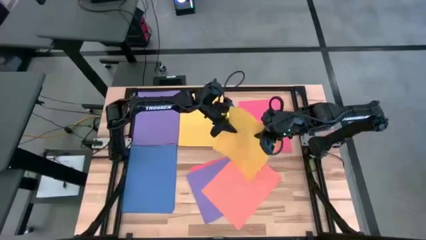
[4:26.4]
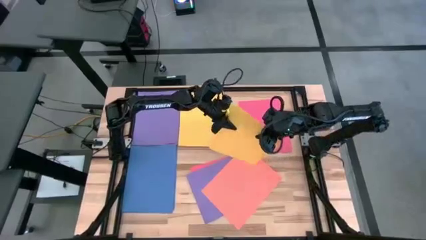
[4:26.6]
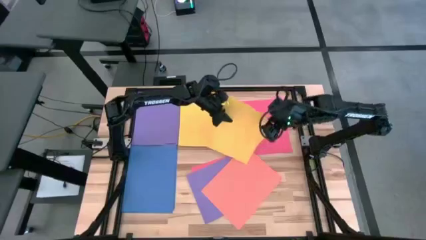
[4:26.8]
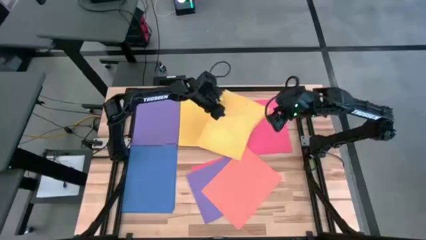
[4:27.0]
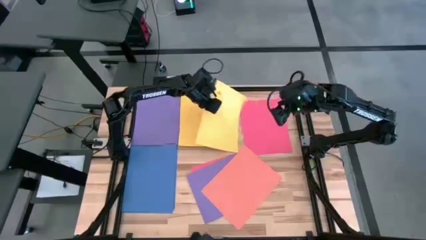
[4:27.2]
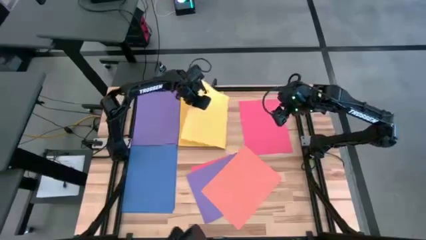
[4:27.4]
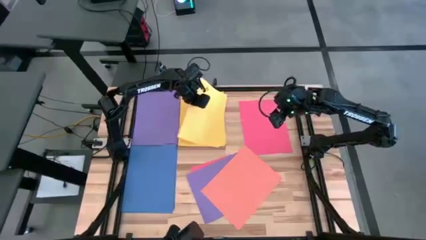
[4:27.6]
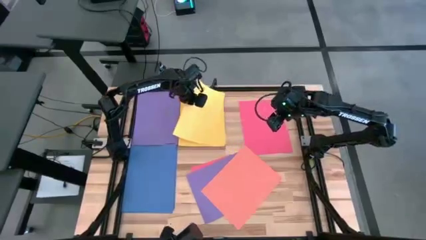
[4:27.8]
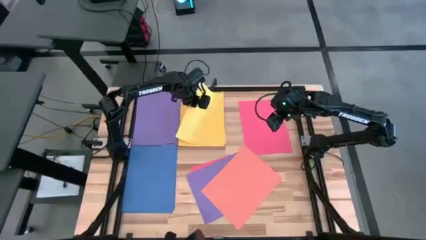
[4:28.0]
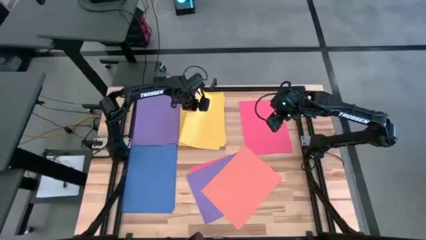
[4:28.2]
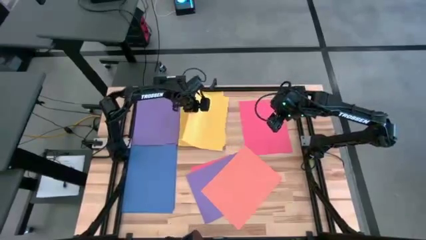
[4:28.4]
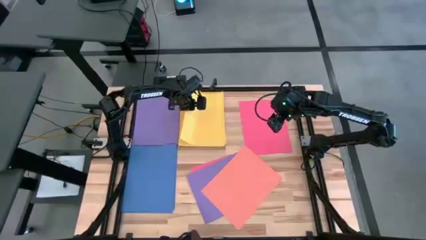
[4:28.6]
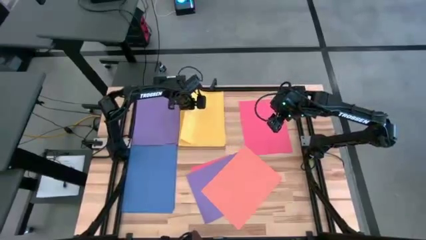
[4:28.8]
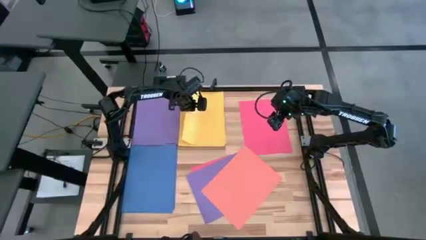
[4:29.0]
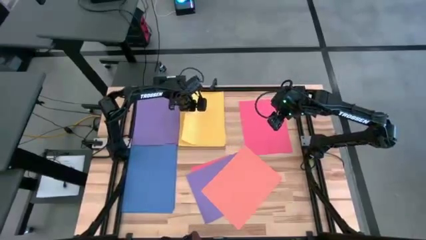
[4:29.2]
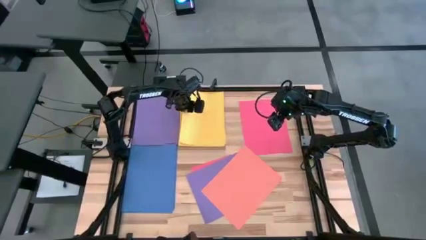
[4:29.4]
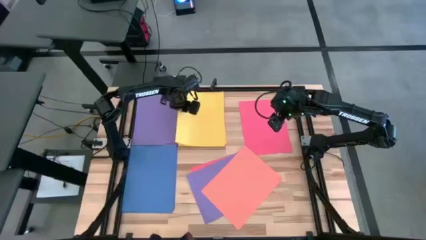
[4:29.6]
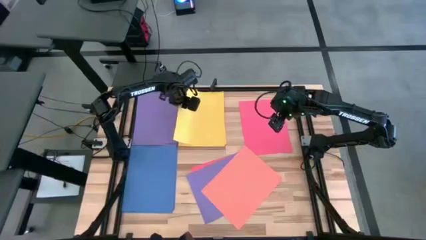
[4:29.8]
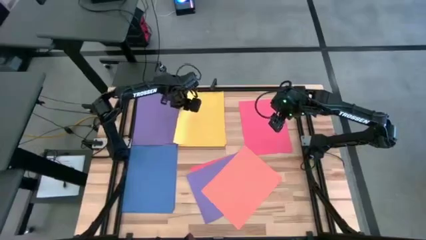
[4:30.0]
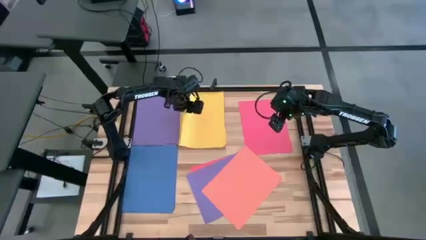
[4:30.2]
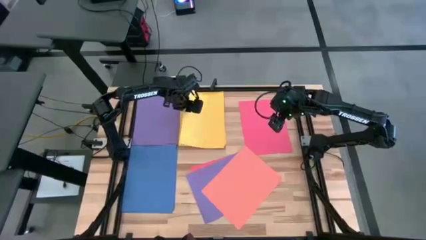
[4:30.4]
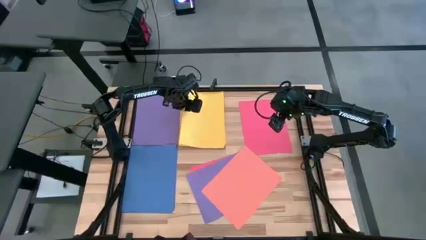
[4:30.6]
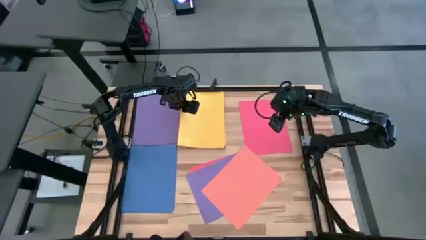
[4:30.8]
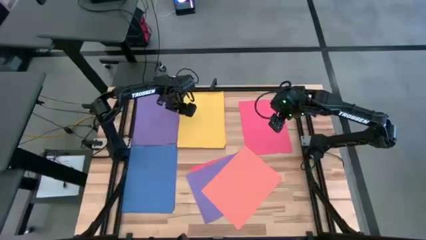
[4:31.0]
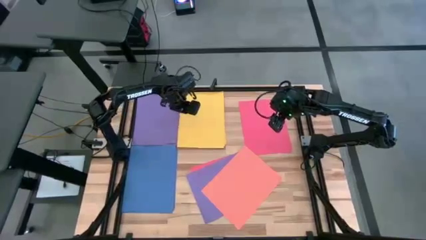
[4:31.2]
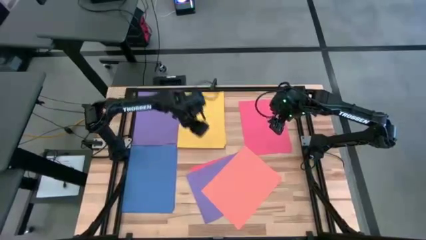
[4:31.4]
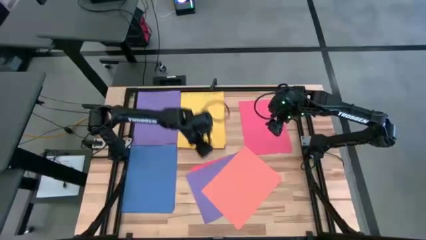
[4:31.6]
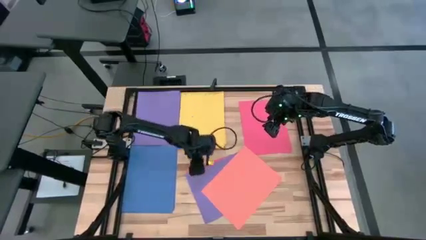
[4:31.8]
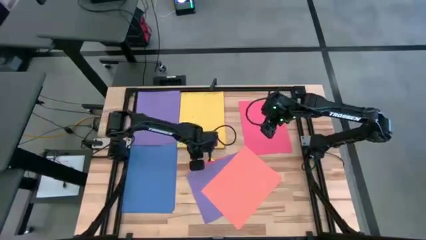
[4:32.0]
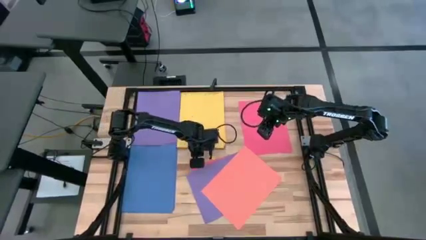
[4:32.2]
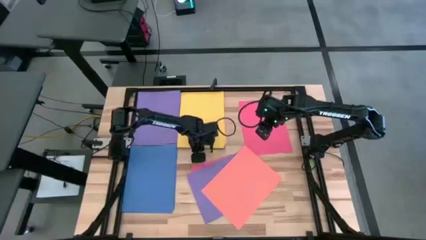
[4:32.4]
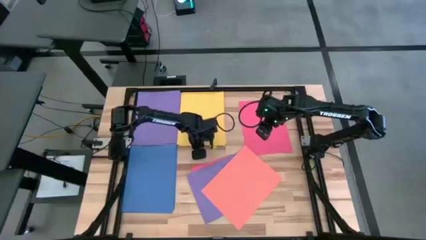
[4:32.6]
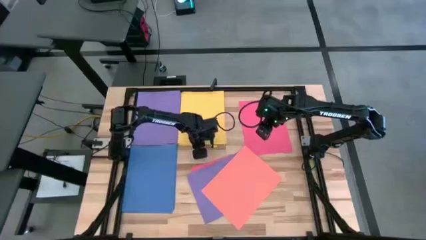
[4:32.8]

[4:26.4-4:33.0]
Task: Organize paper
Stack the yellow paper on top of the yellow paper

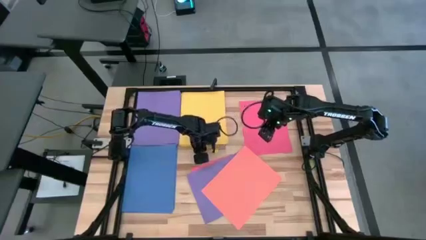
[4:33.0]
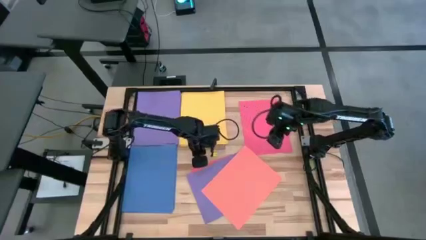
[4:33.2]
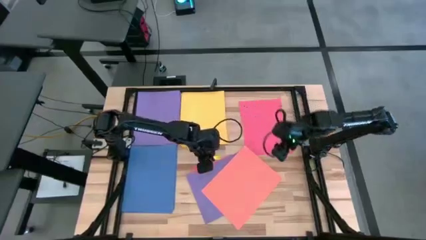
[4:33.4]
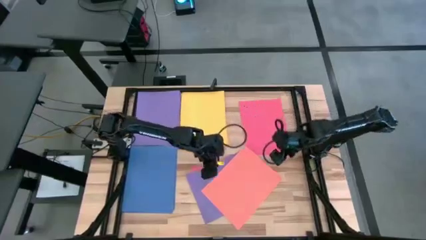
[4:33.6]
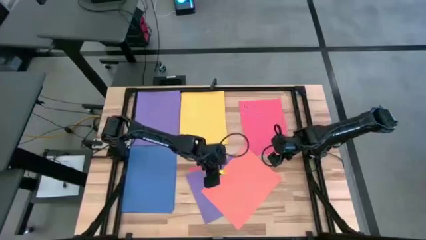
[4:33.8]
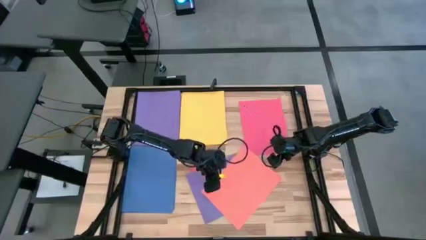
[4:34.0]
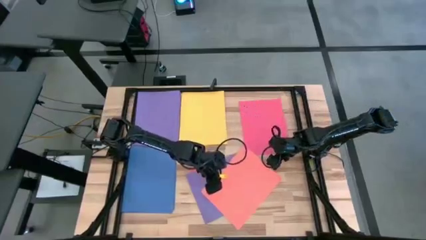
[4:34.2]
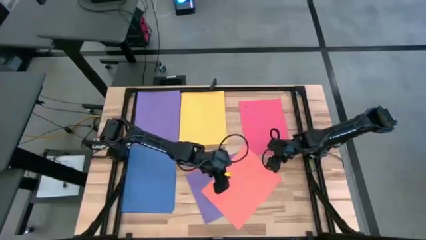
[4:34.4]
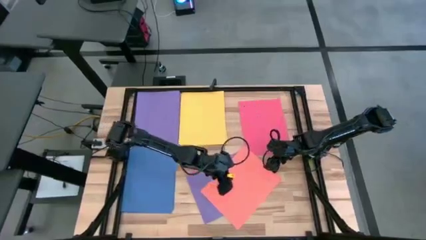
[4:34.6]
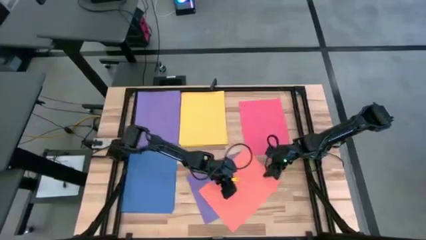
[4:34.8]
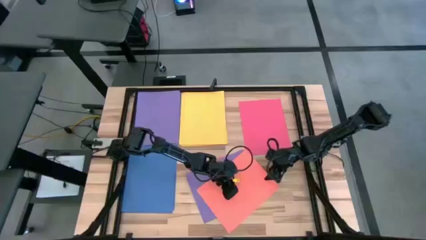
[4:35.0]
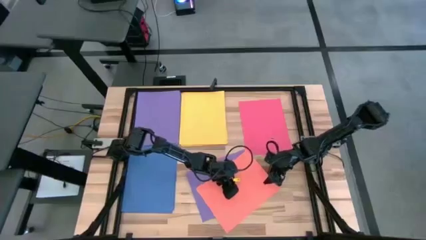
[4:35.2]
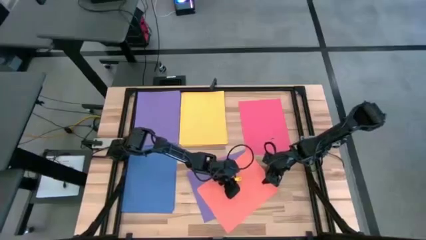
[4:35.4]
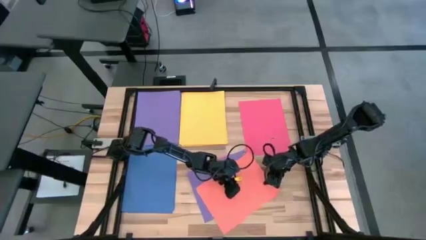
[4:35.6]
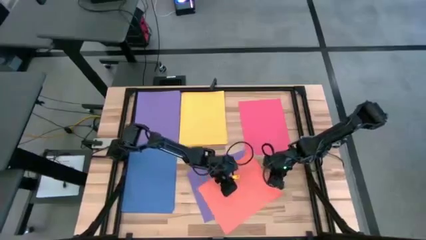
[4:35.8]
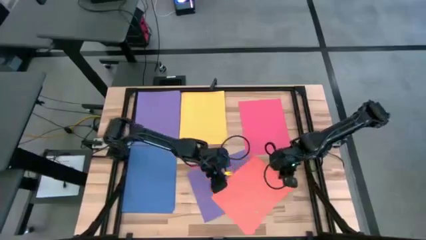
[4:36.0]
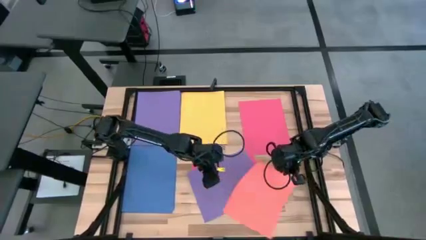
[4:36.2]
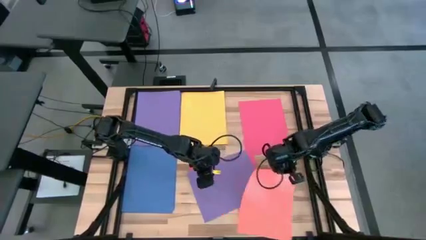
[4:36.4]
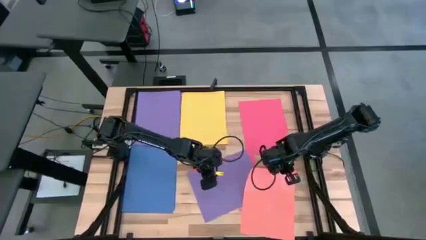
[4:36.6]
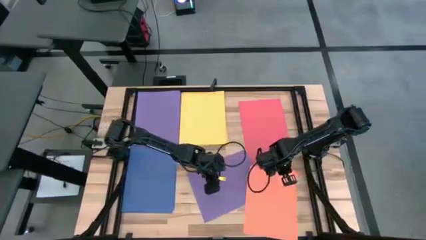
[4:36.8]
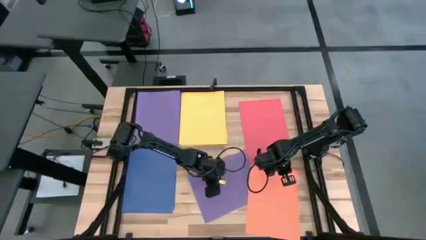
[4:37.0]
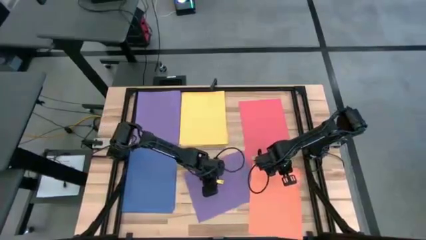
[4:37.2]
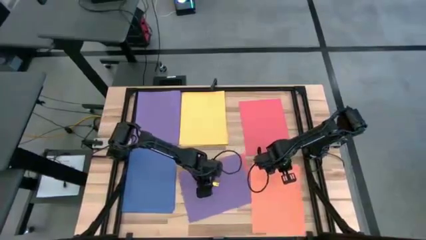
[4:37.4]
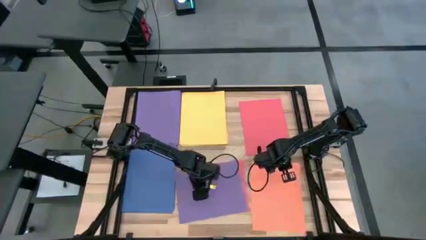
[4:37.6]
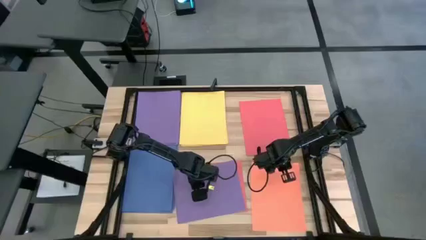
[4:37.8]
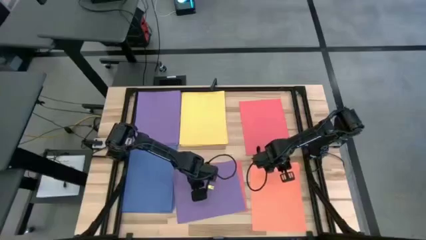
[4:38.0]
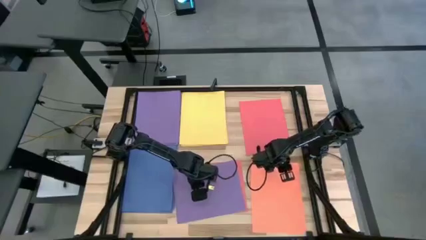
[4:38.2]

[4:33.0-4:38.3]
Move the orange paper to the bottom right of the table

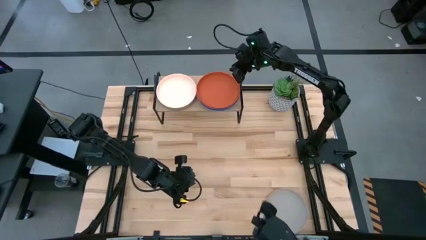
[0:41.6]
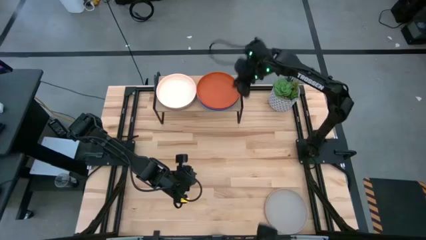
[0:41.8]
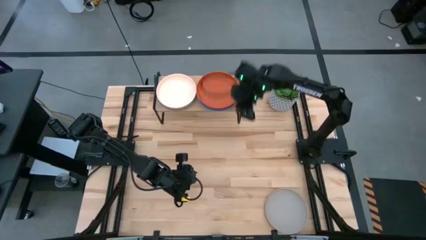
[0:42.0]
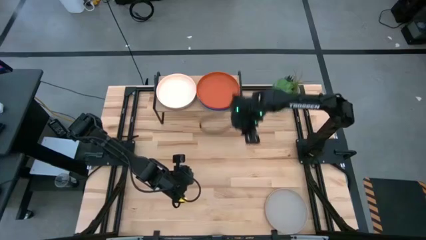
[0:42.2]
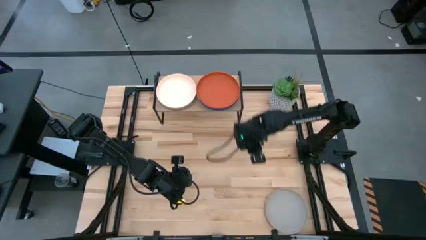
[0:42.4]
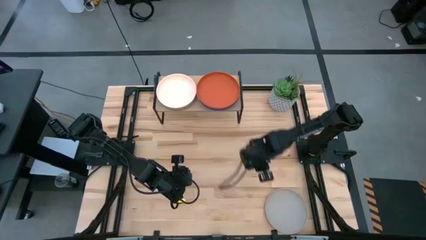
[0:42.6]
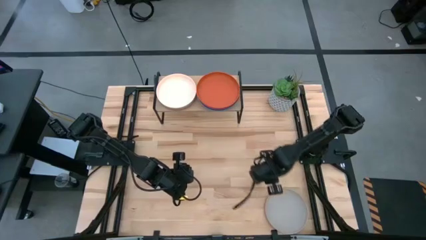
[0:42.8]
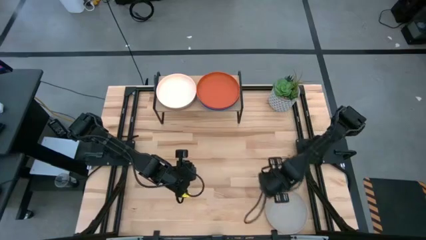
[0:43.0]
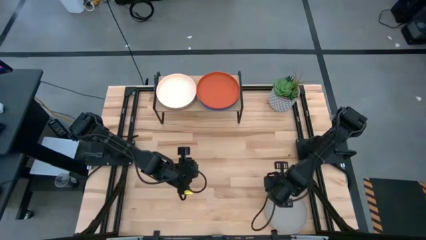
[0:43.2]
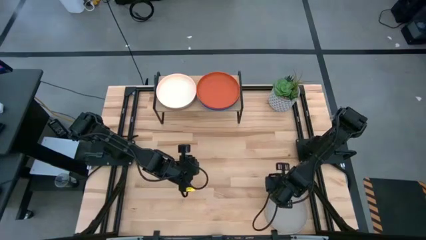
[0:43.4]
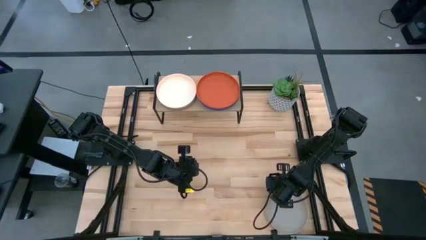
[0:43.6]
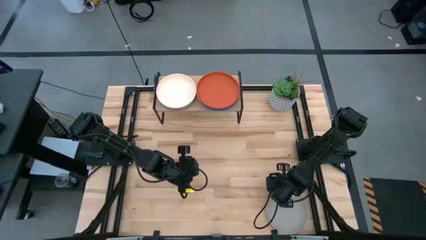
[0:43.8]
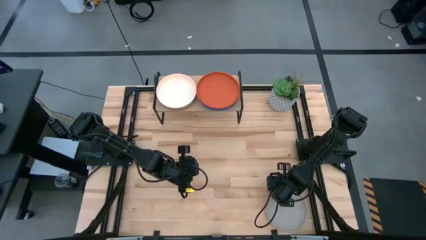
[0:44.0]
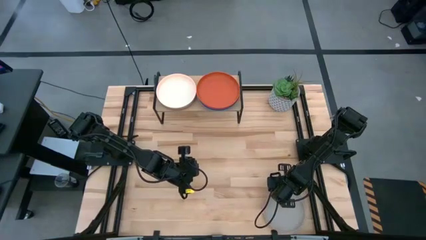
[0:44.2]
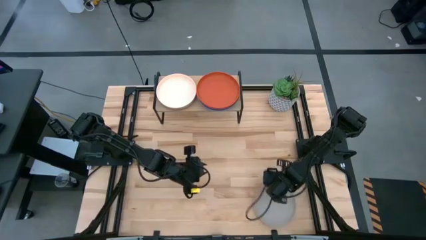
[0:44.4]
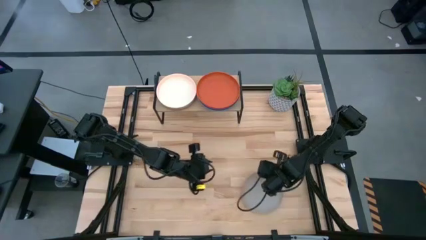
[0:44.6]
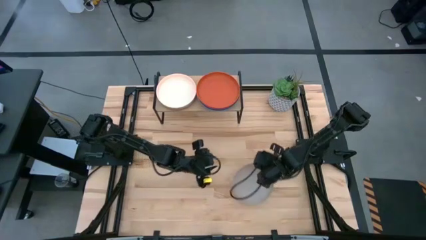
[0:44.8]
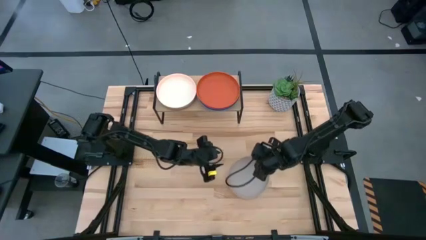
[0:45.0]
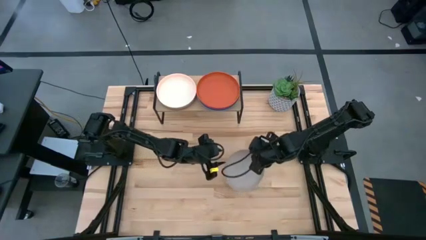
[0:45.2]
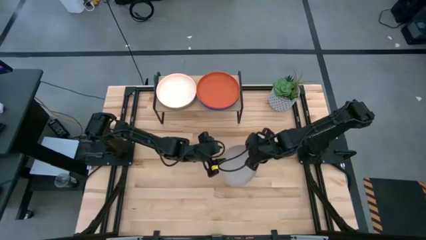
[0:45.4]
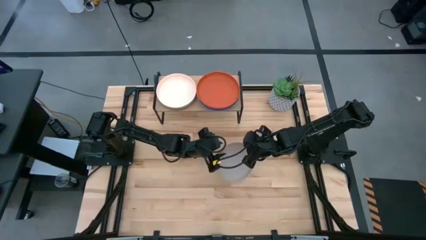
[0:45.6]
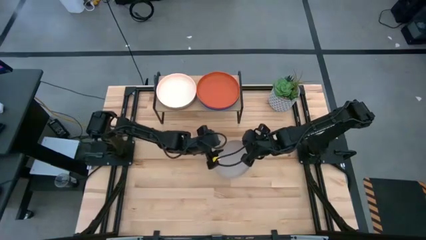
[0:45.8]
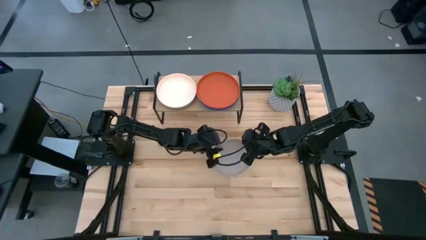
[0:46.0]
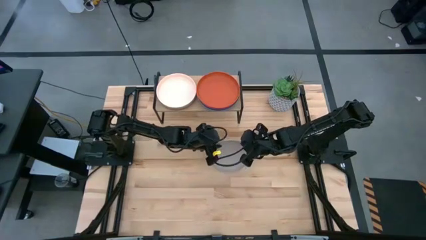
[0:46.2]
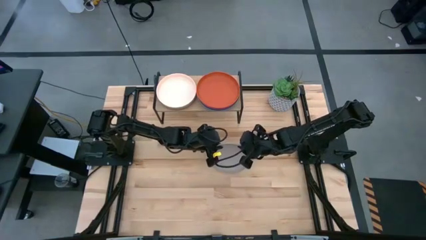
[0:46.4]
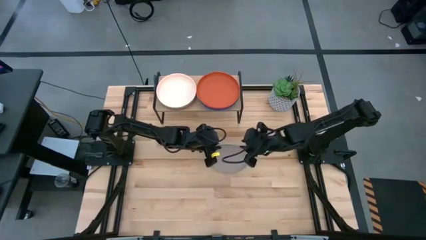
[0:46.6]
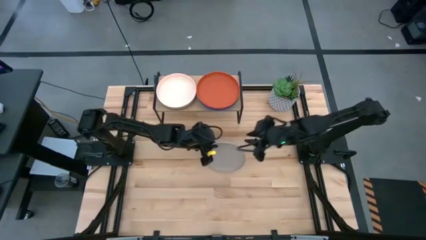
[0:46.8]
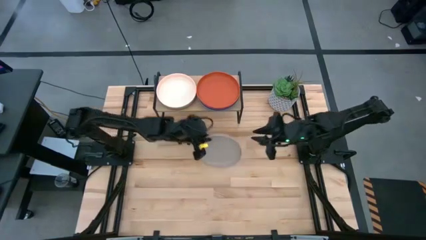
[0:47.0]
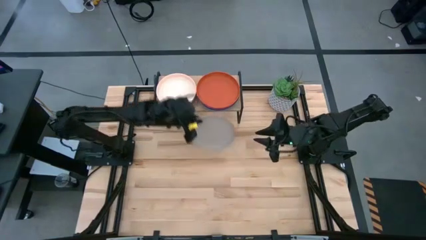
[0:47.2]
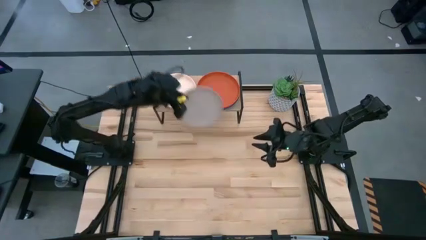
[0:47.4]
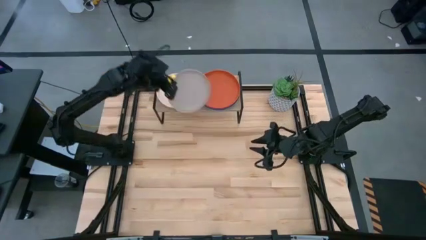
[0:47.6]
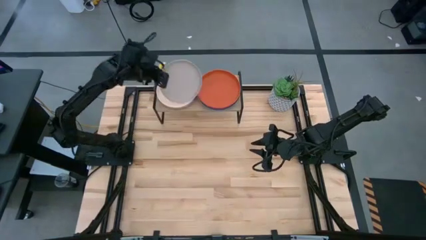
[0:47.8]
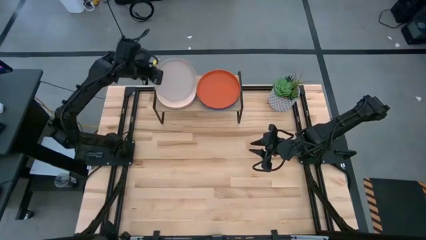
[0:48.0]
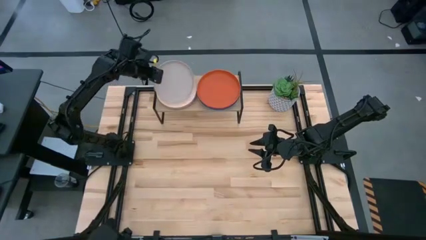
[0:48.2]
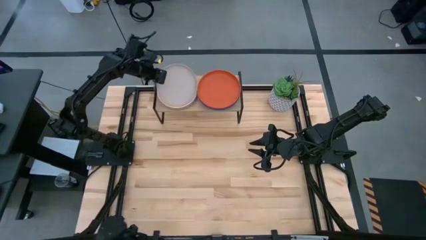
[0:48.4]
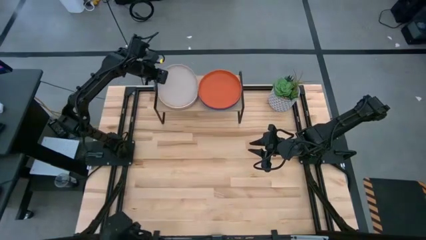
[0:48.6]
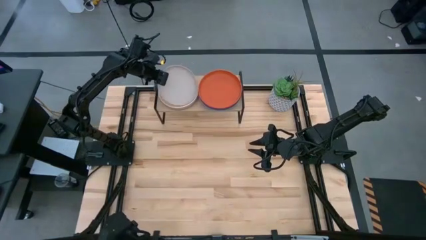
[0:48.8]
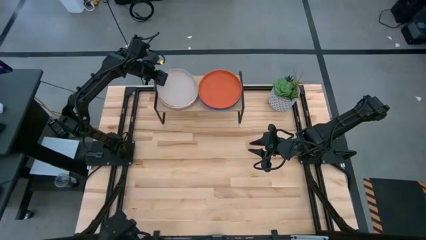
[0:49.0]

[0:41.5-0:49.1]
Task: Place and stack plates onto a shelf
Stack the gray plate on top of the light orange plate on the shelf
